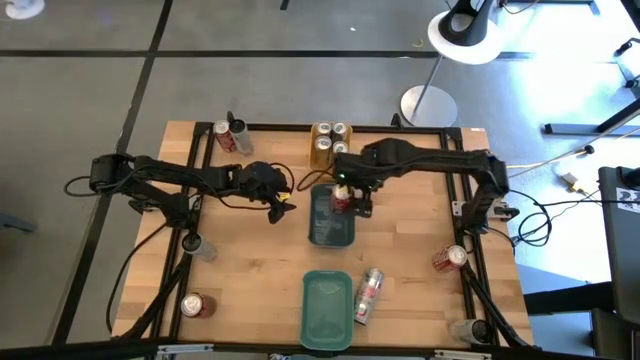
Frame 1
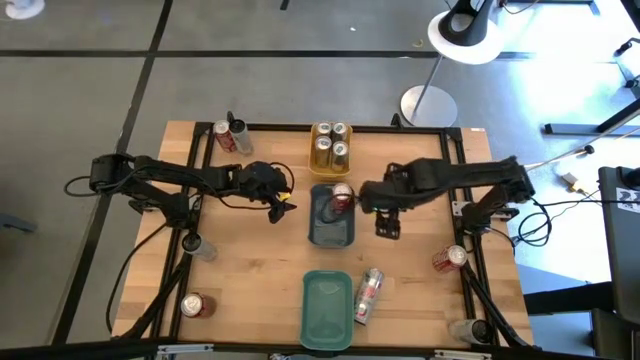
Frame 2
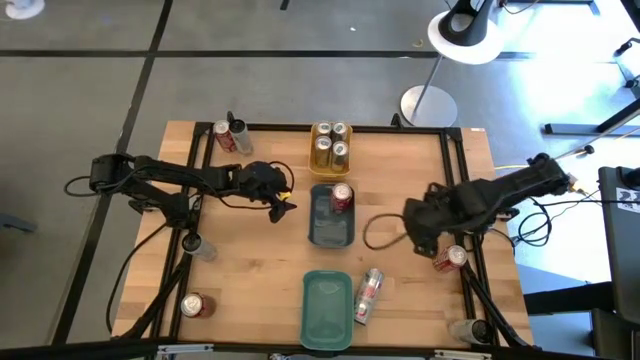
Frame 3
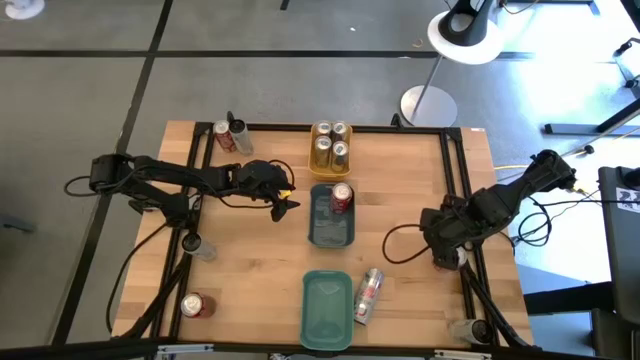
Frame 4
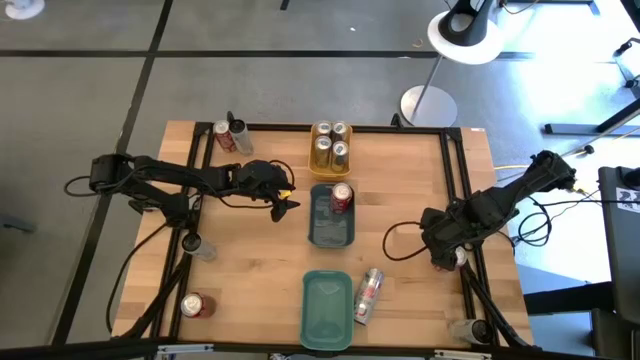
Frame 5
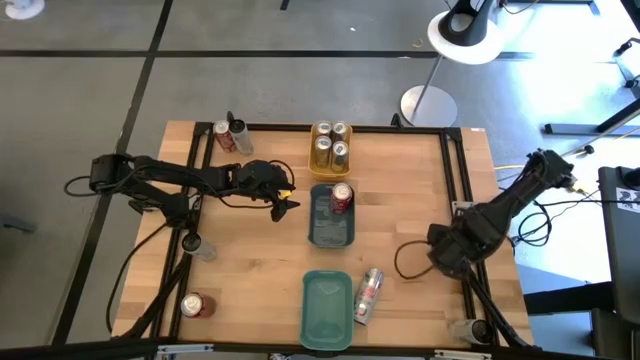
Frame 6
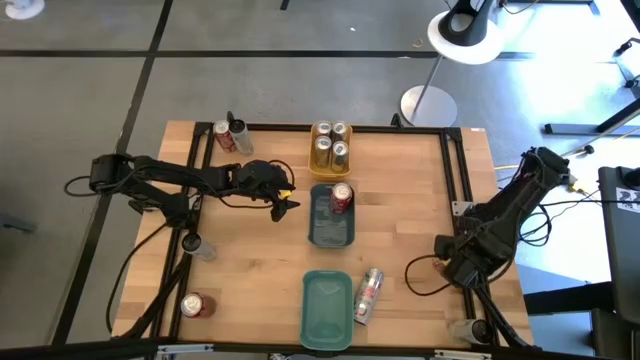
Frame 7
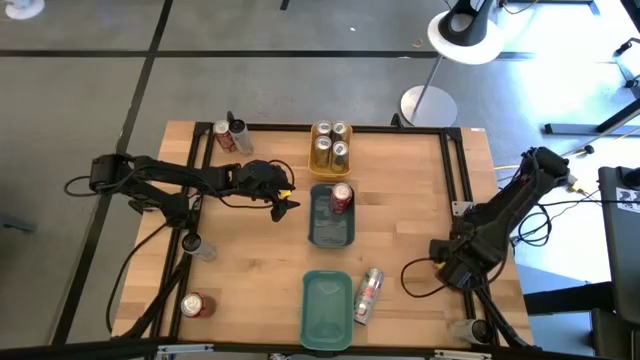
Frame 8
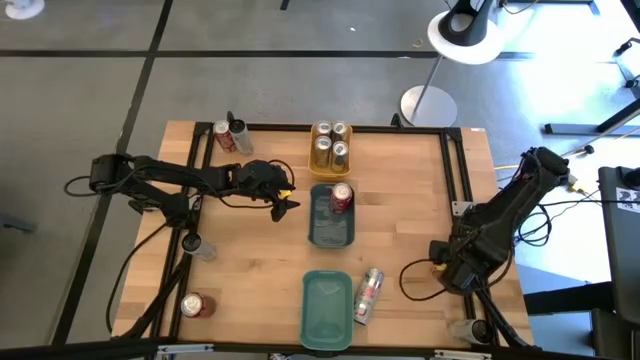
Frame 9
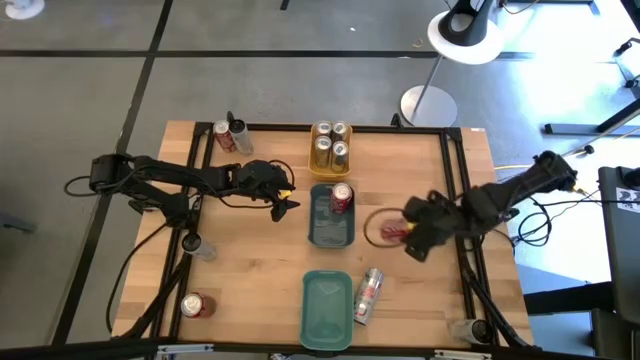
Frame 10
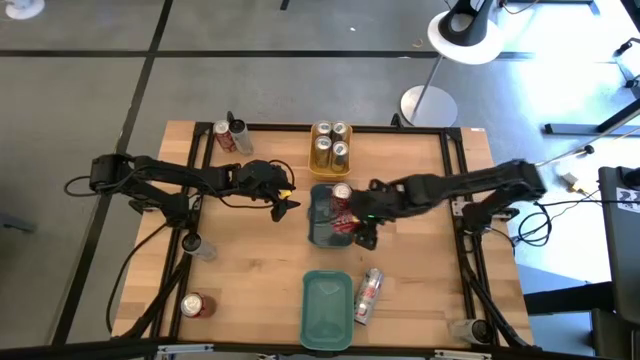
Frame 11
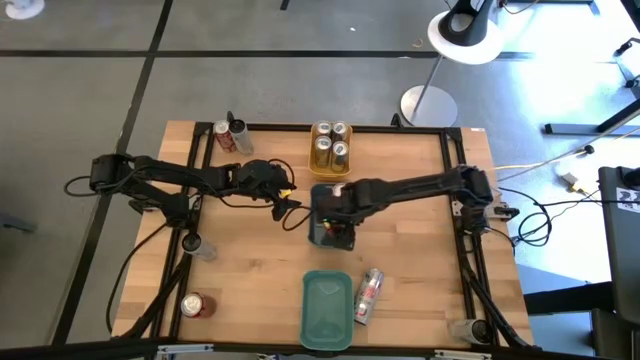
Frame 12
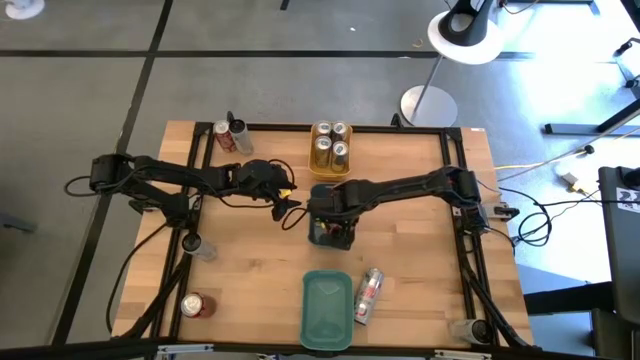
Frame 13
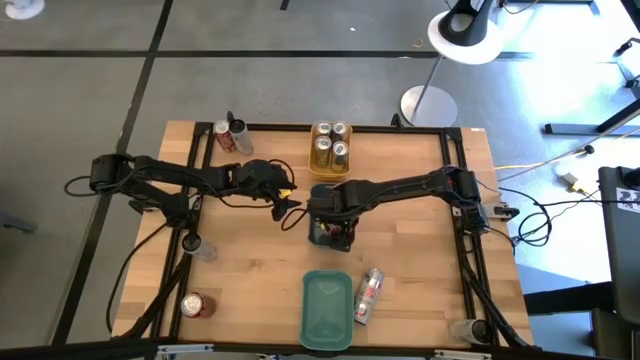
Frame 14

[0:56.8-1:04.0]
Task: Sort soda cans
Put the right red, white soda can into the blue bin

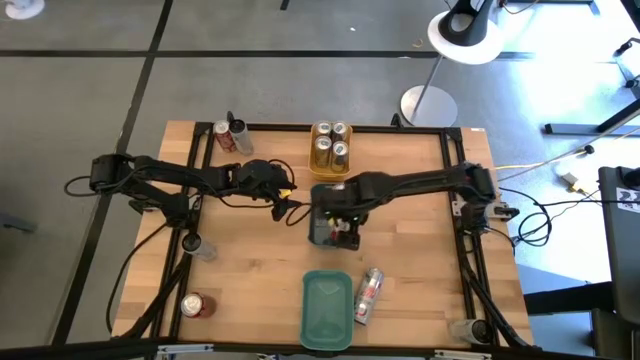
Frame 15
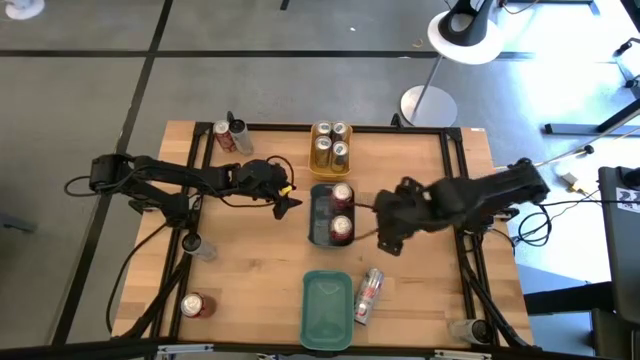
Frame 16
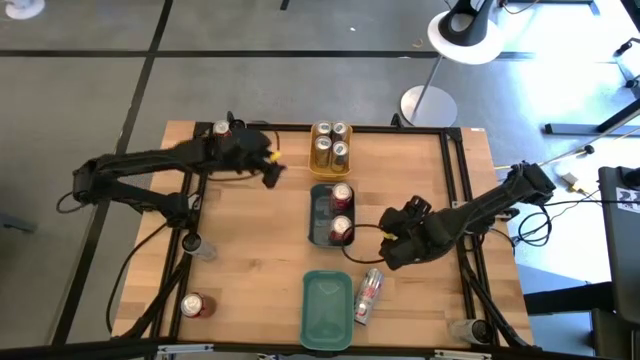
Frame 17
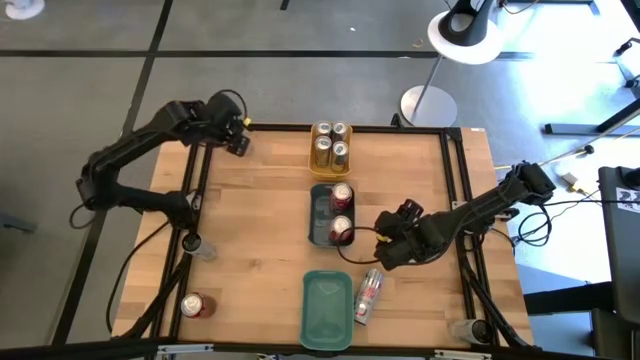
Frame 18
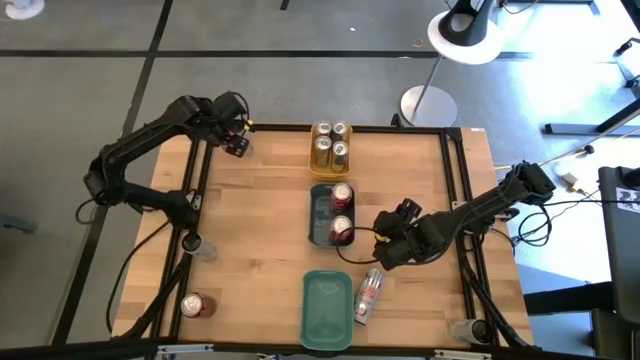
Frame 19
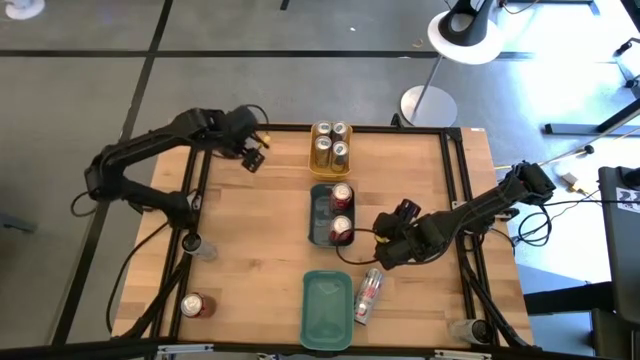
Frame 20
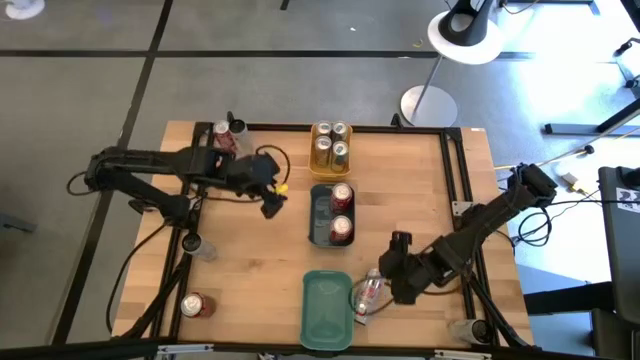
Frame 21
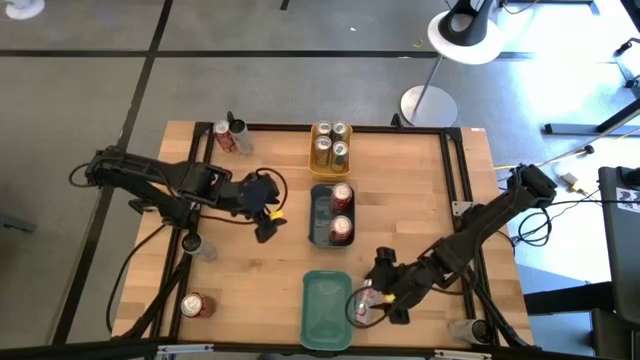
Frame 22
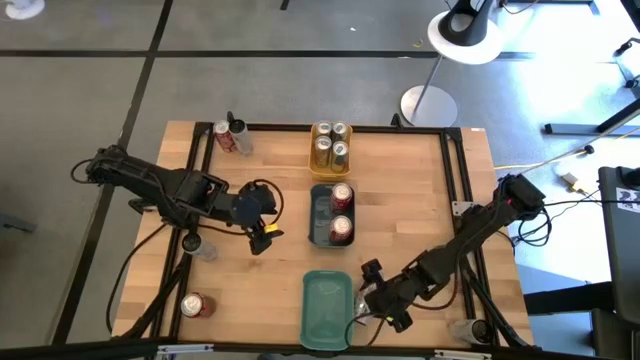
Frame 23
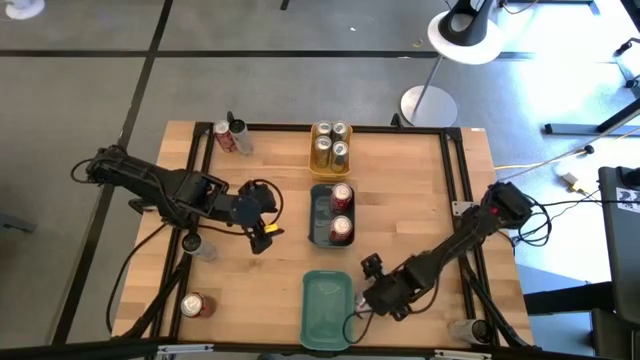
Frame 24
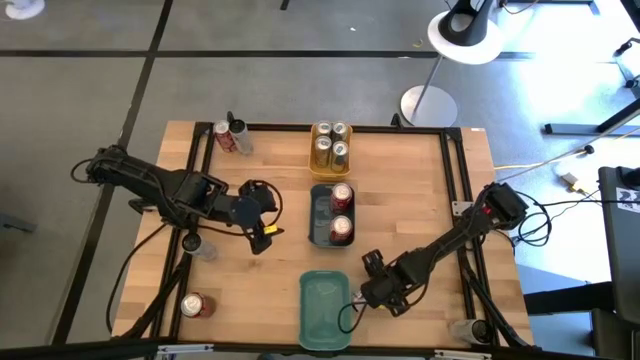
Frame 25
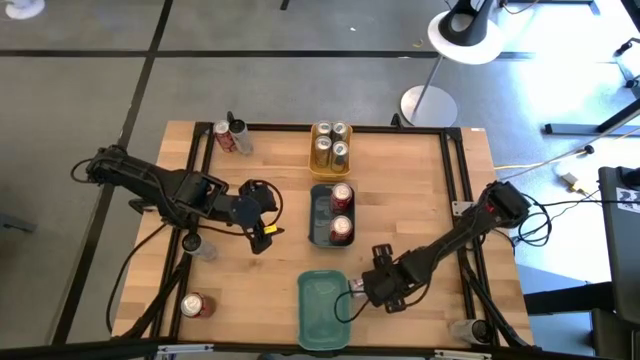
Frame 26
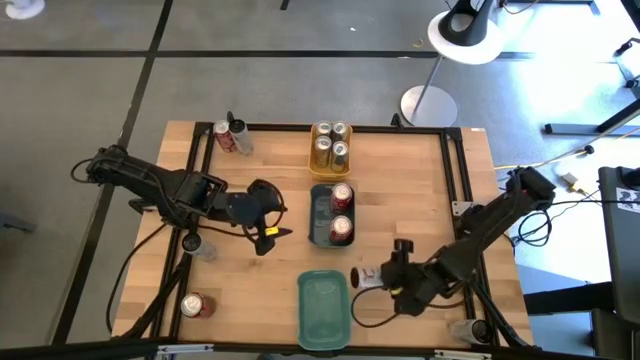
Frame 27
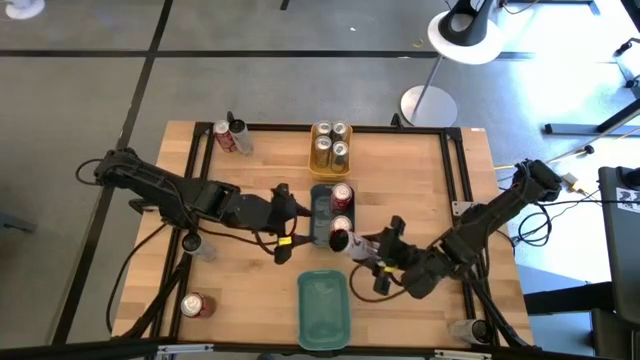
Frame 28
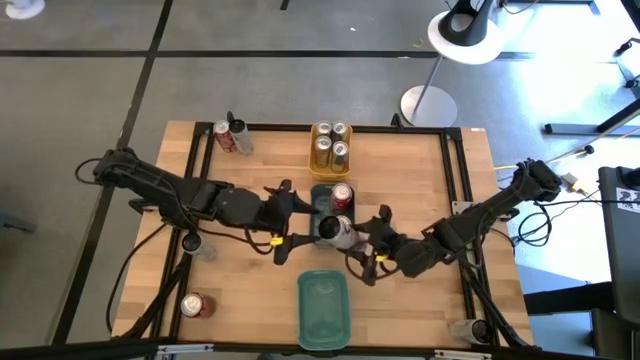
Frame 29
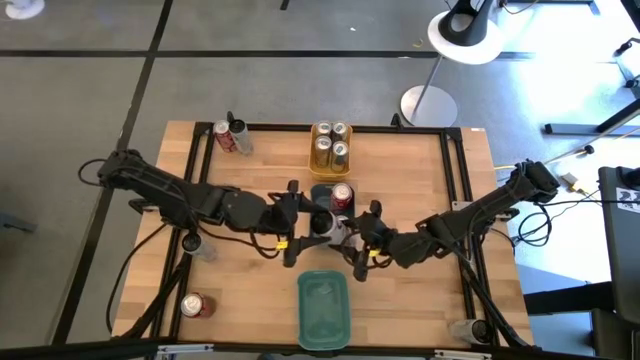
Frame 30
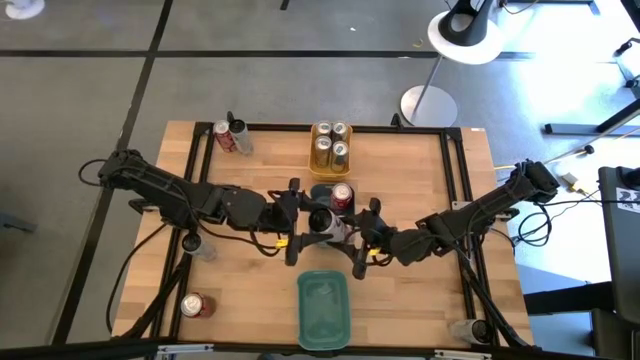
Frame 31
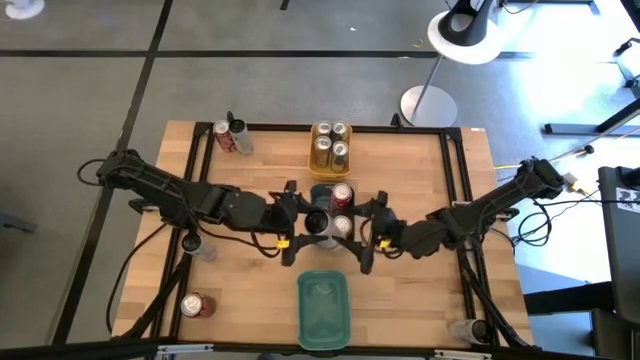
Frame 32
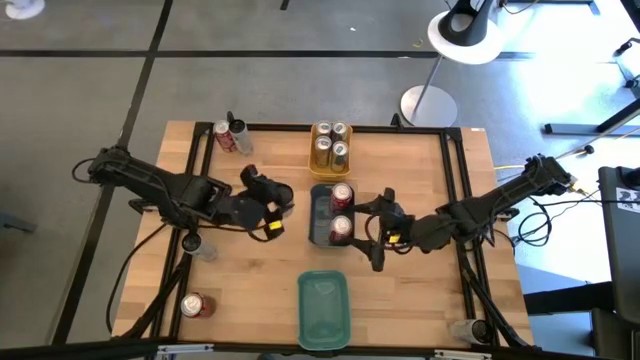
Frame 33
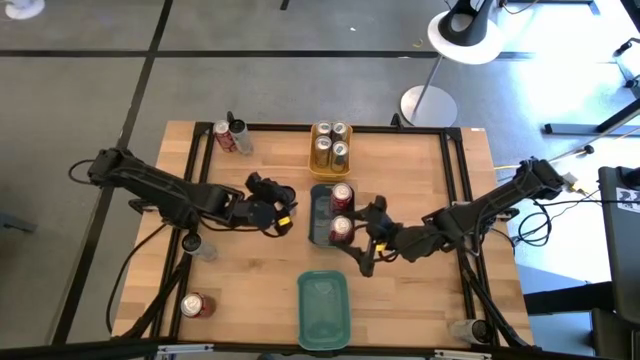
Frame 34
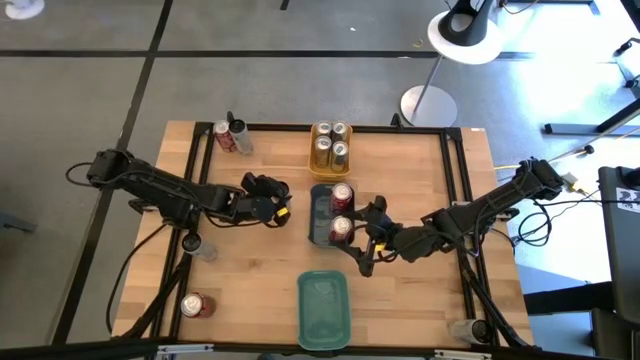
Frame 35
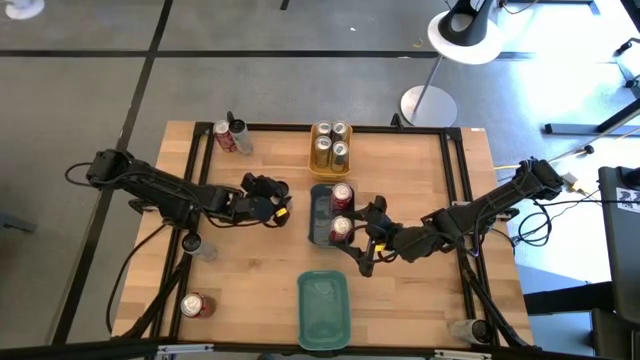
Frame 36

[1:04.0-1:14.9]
Move the bottom left white, pink soda can from bottom middle to the middle of the table

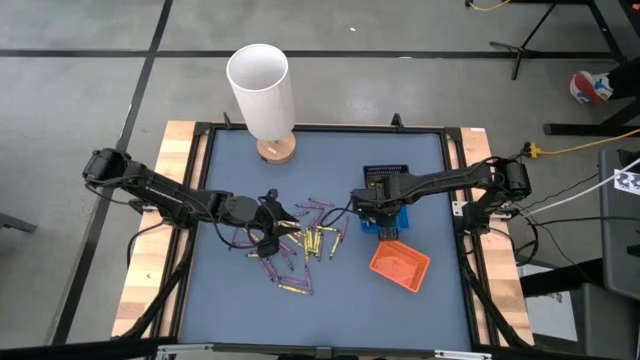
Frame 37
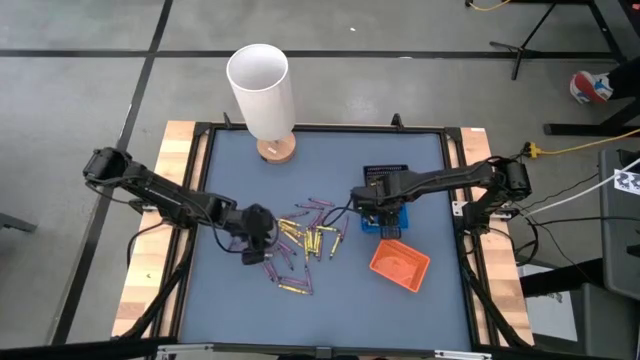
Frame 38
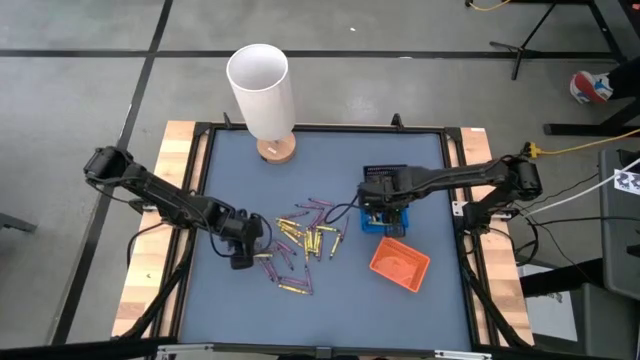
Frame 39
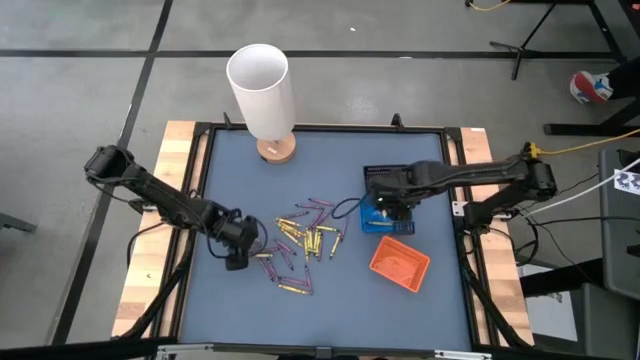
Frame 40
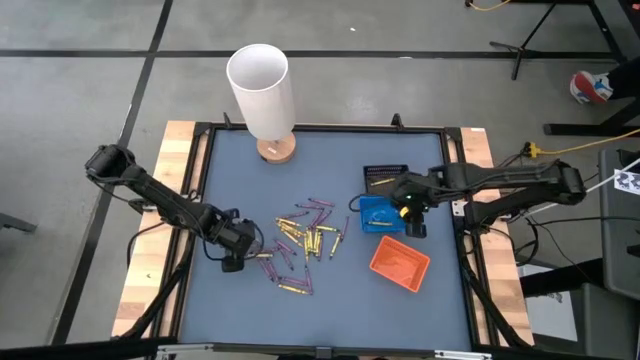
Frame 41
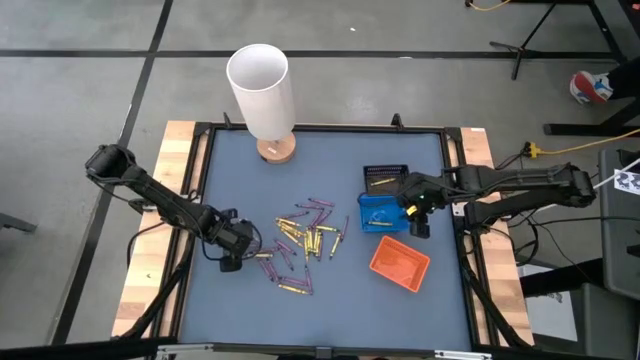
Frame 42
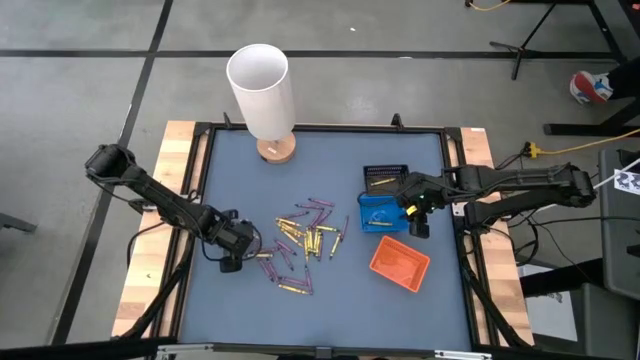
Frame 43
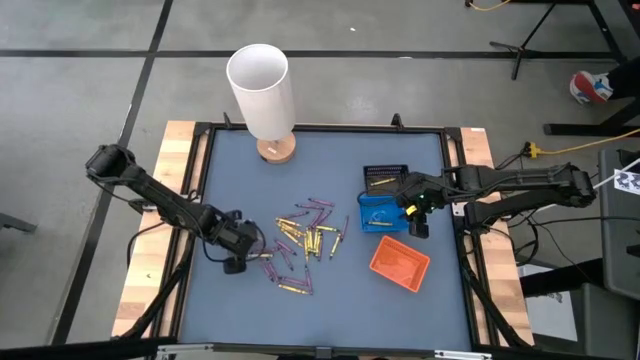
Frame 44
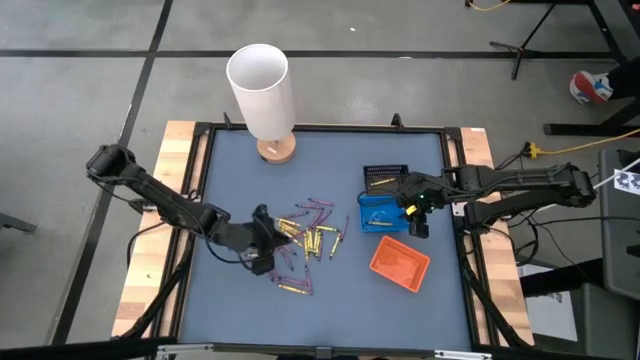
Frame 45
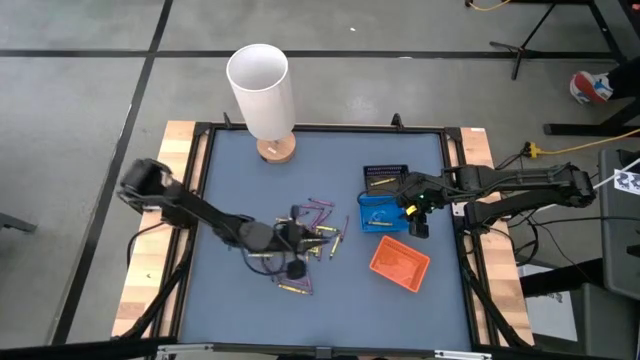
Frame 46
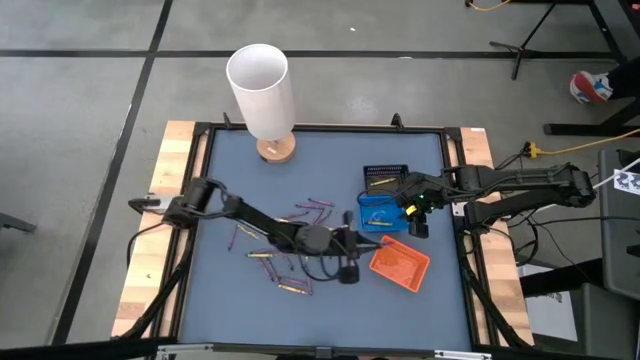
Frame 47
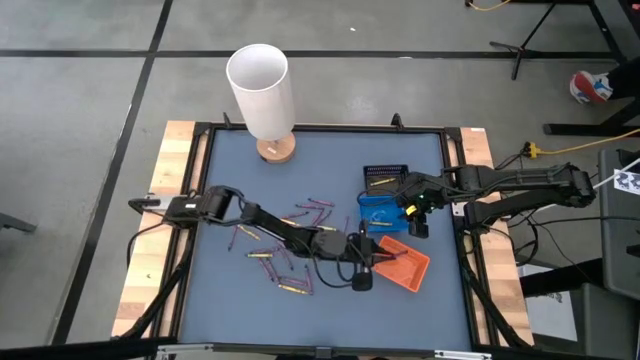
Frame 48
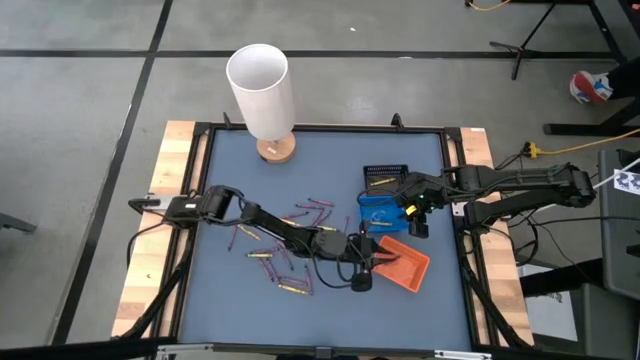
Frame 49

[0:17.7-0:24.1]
Task: Sort crayons
Put the purple crayon into the orange bin
